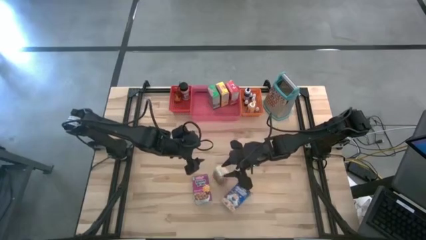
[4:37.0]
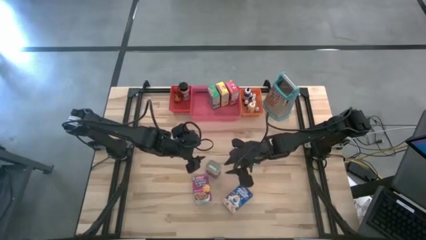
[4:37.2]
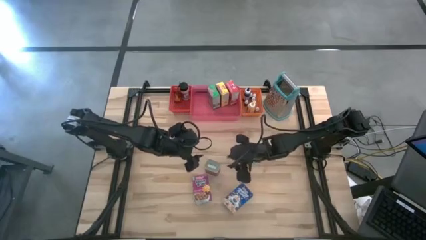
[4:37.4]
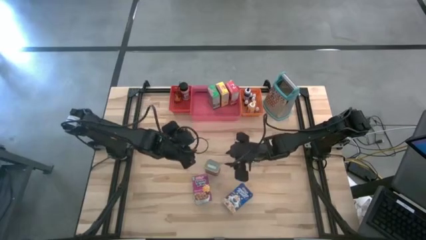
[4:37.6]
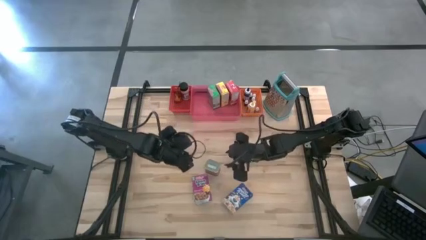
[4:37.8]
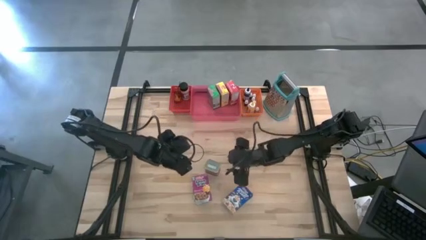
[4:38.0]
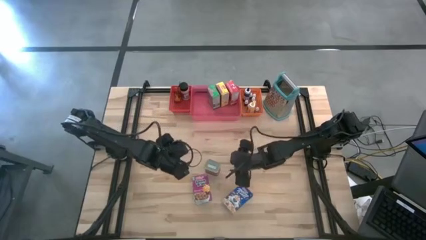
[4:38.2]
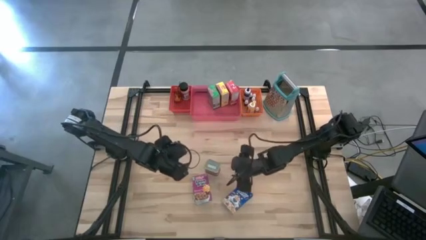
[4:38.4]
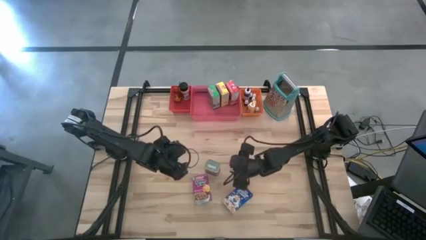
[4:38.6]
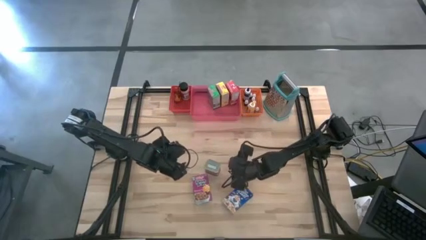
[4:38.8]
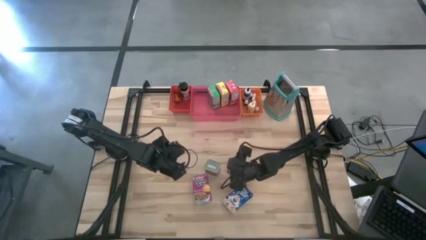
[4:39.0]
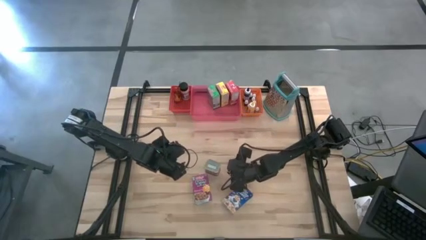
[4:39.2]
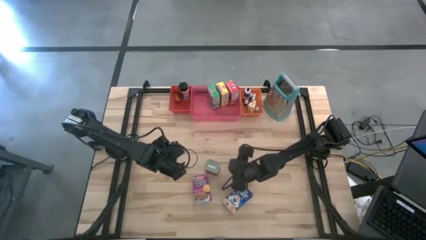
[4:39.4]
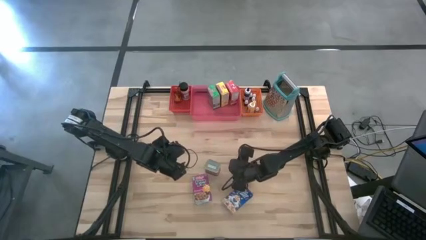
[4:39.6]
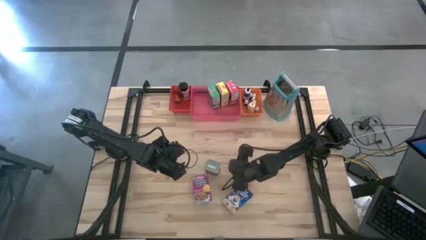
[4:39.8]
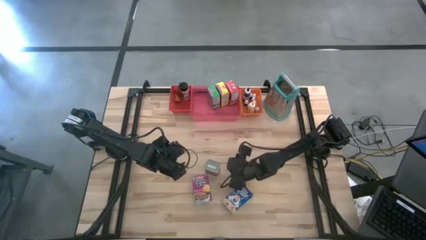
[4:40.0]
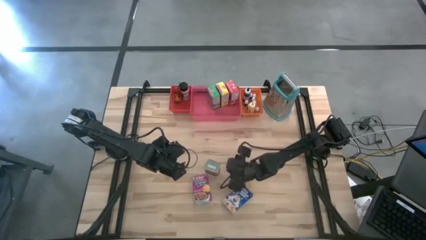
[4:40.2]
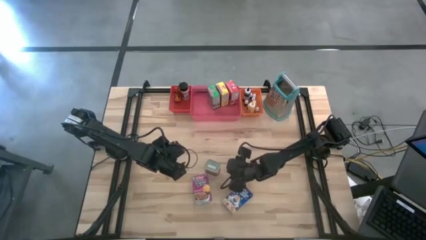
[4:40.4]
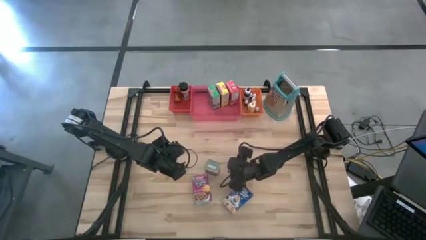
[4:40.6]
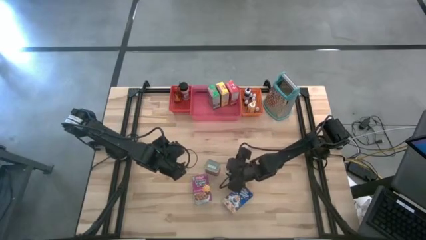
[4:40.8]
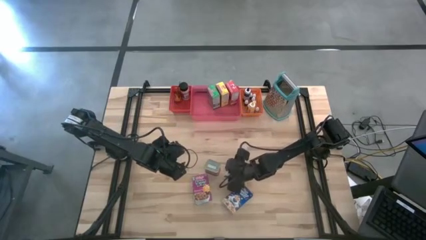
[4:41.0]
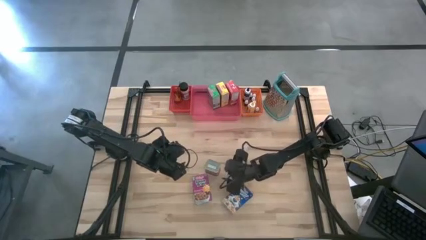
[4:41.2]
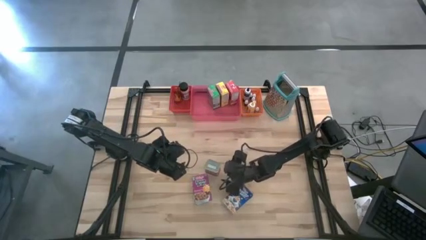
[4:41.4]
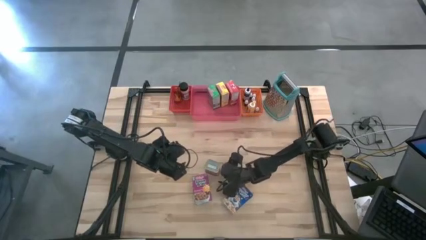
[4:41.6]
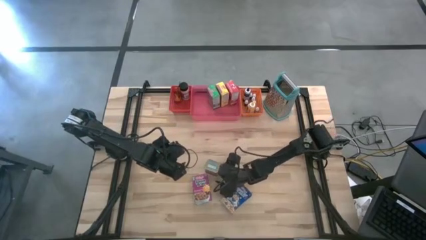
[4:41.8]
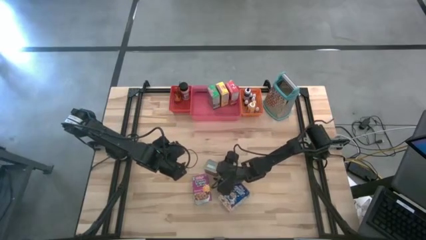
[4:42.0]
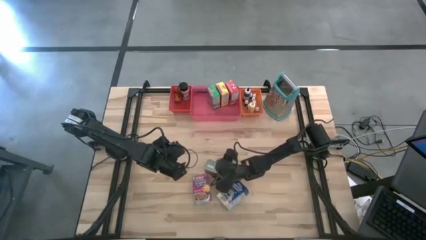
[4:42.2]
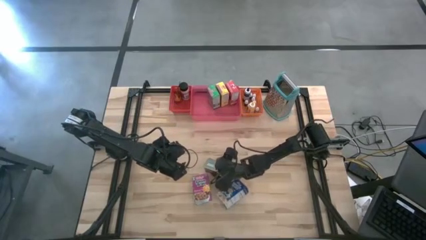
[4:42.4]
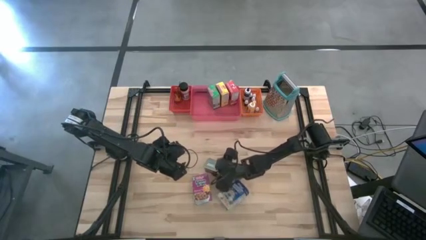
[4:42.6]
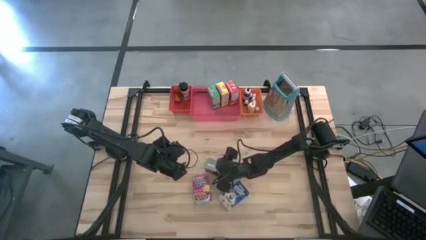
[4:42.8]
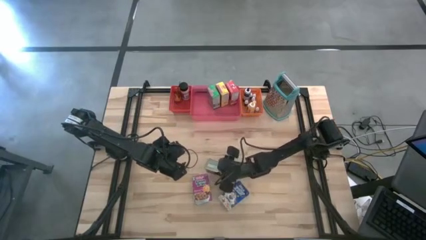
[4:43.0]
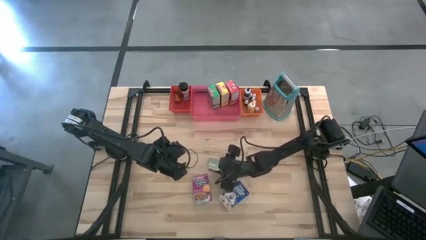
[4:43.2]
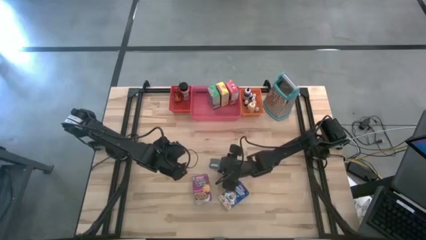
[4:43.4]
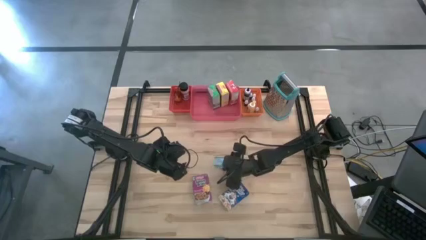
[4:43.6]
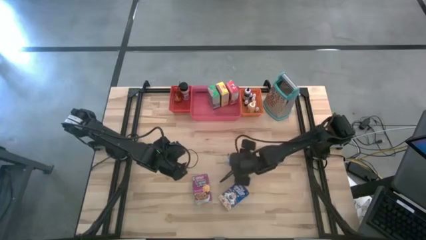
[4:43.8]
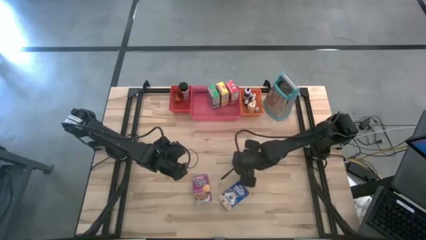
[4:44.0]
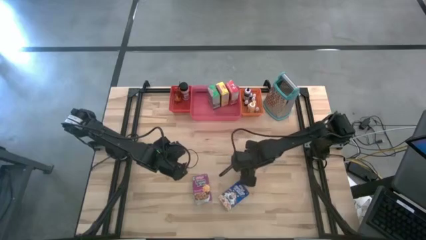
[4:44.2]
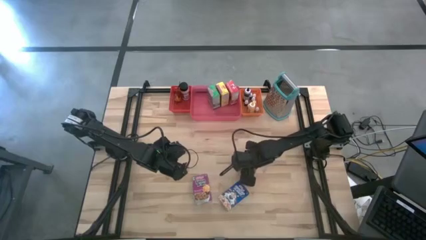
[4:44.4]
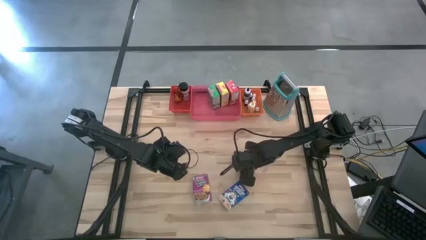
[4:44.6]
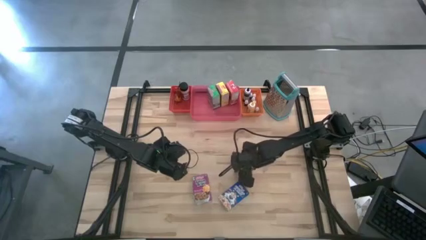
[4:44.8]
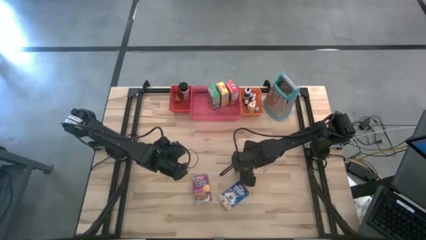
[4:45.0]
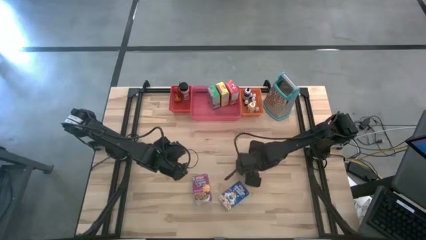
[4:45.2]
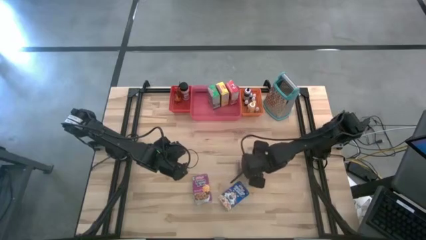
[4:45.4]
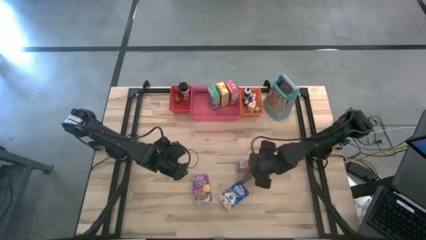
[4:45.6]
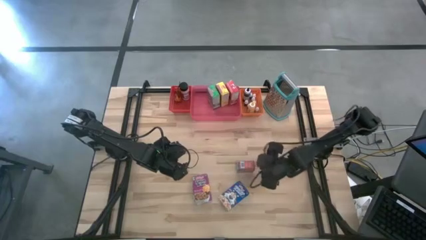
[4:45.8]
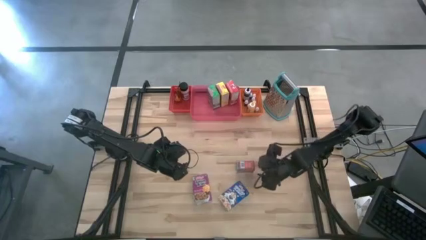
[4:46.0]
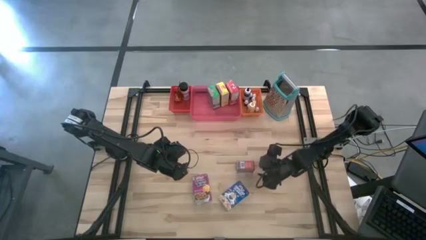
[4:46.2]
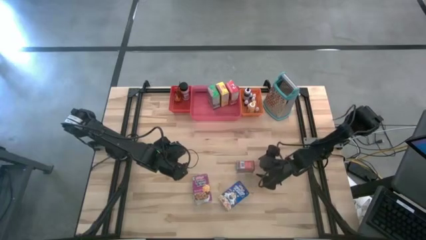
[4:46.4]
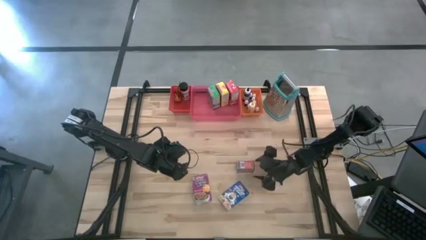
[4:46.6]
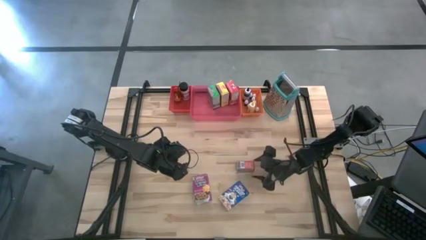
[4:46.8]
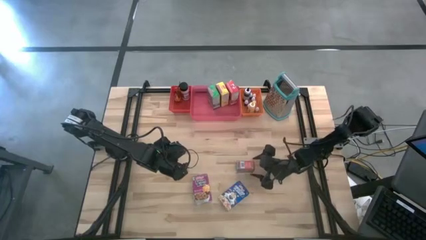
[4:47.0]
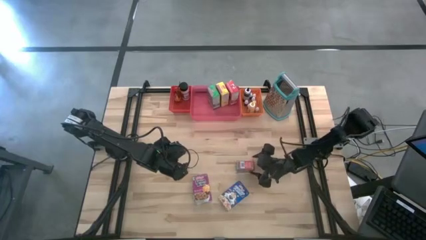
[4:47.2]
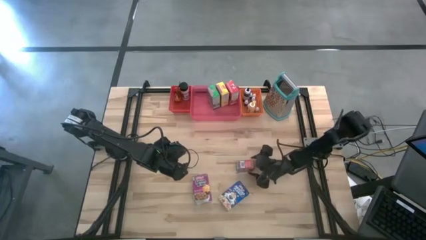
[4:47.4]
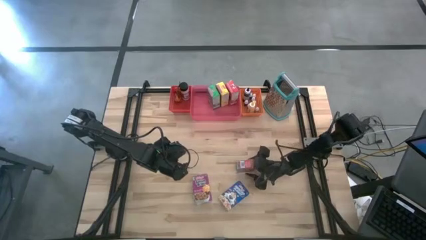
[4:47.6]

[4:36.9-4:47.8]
Task: Pick & Place Kitchen Items
Put the red seasoning can into the red bin

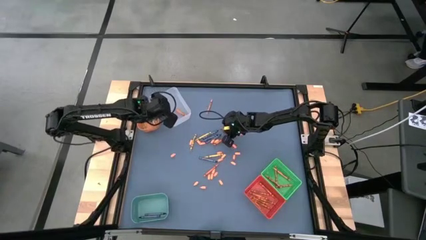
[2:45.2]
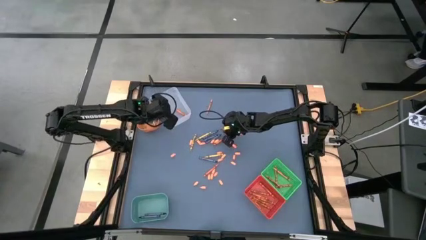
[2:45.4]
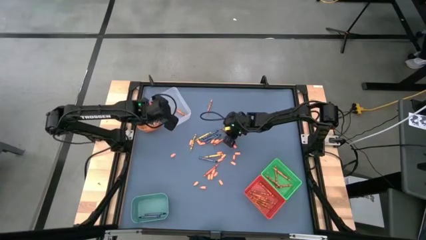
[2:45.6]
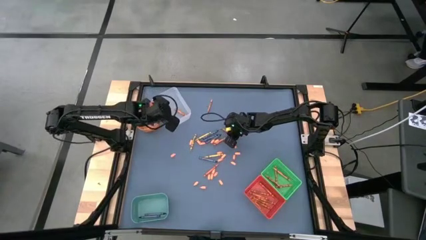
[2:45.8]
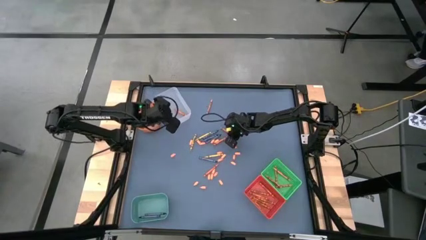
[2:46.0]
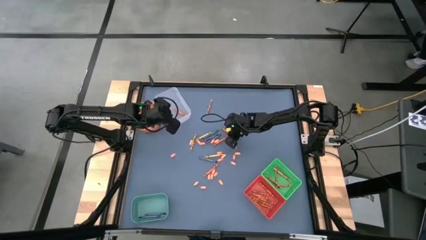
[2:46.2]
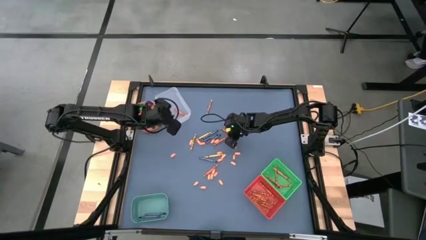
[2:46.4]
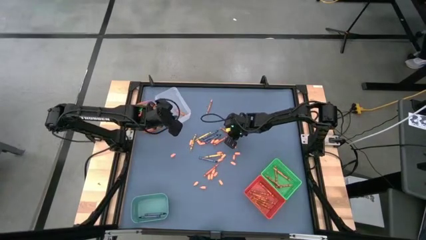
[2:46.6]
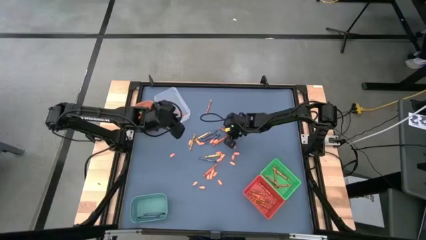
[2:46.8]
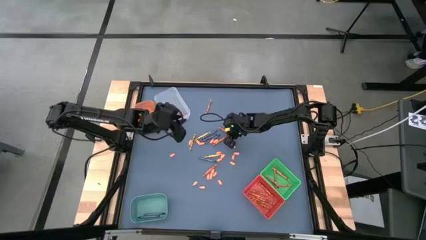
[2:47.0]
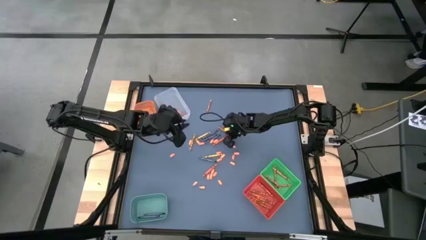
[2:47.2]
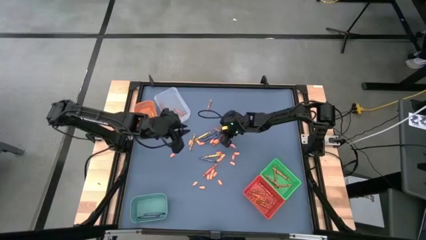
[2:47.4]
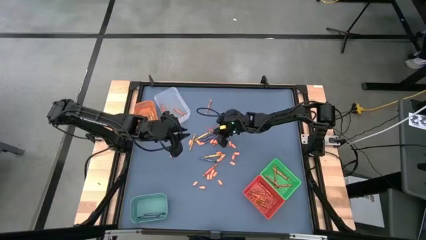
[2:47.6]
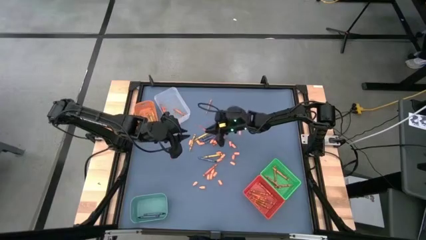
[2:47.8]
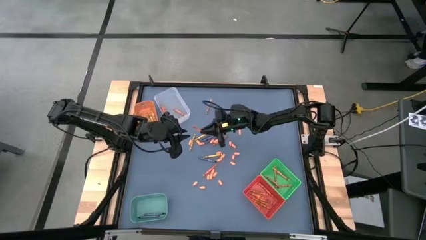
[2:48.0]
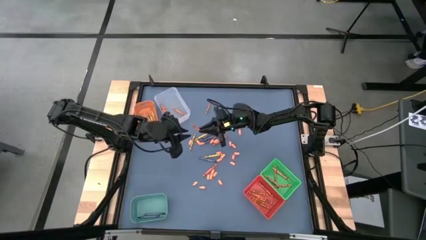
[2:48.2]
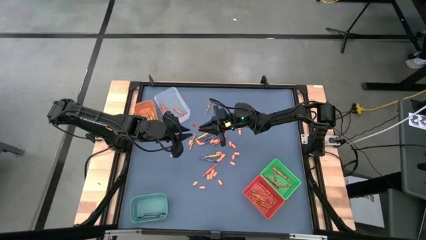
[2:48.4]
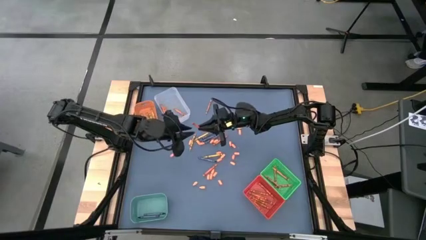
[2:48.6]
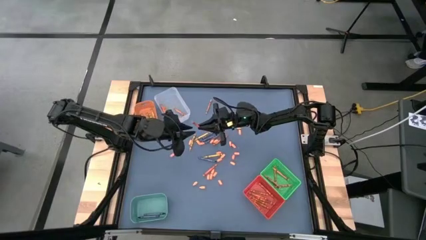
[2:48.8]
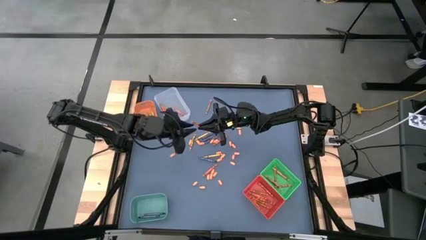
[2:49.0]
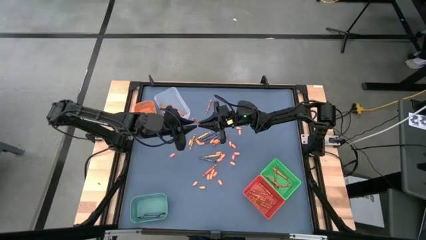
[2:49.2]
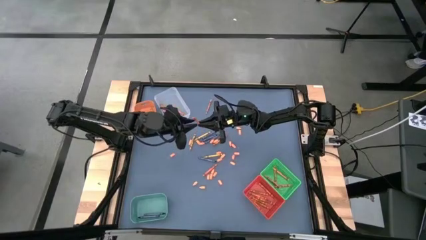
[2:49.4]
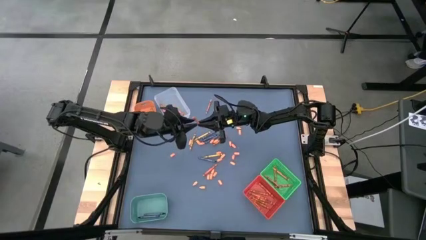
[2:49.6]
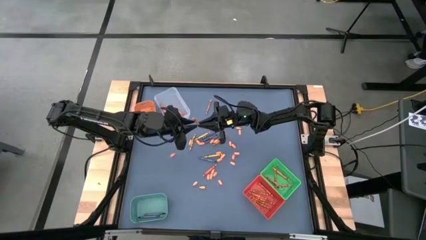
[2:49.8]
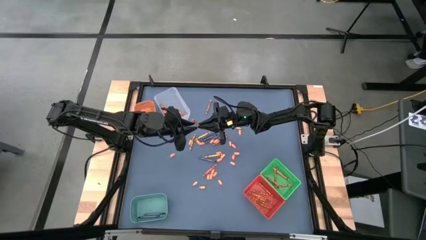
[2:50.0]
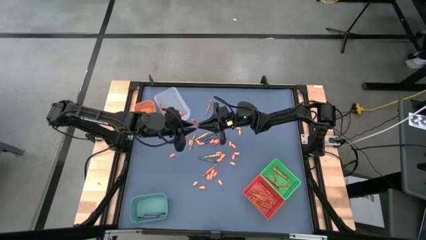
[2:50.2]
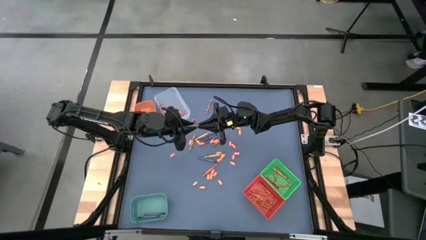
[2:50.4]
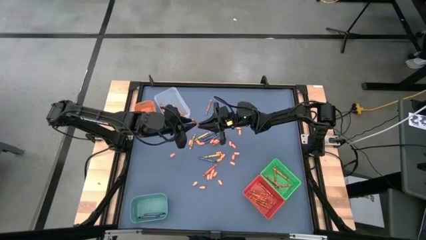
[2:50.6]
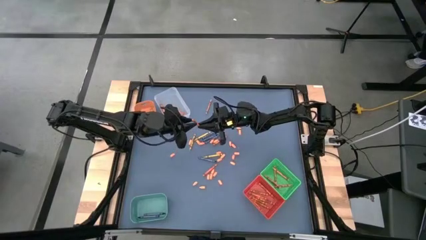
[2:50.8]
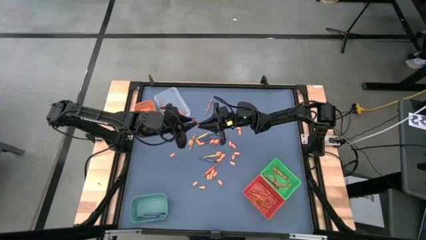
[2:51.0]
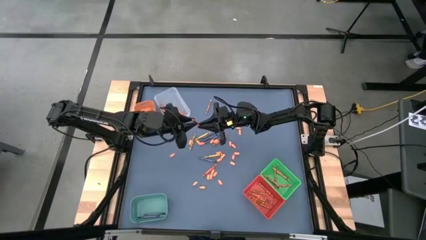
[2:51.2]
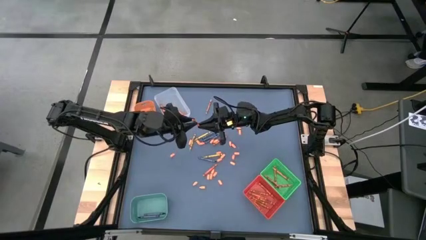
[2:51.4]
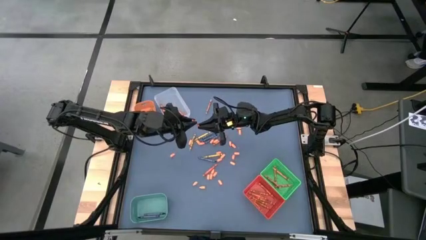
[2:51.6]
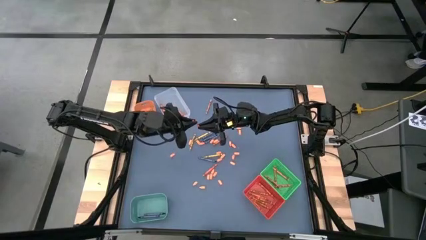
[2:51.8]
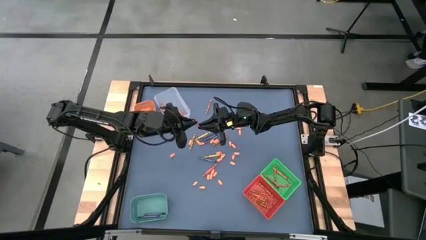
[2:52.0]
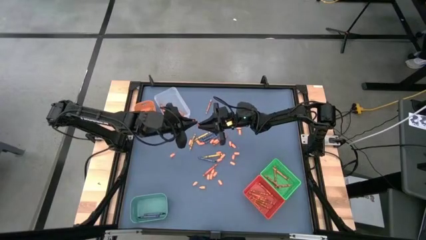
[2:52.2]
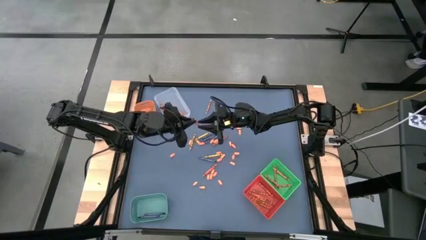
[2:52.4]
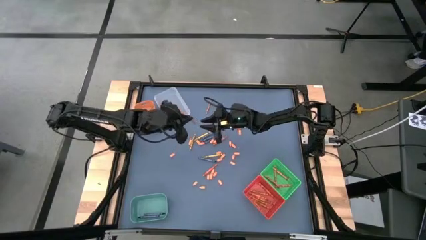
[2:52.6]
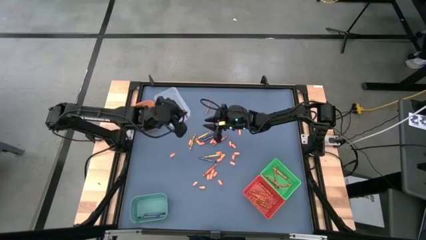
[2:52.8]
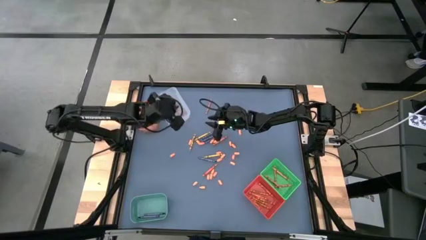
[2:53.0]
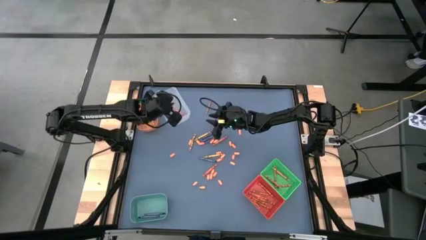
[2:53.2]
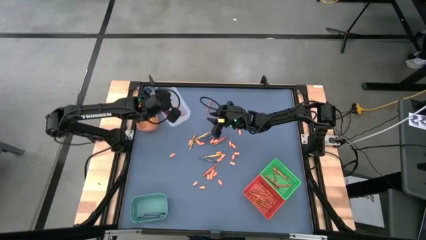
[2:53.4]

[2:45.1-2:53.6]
Task: Sort crayons
Put the orange crayon into the transparent bin
